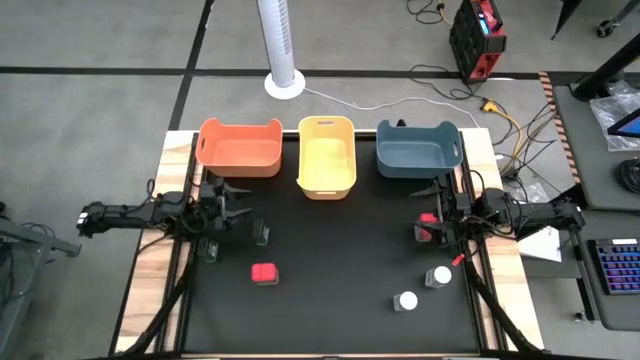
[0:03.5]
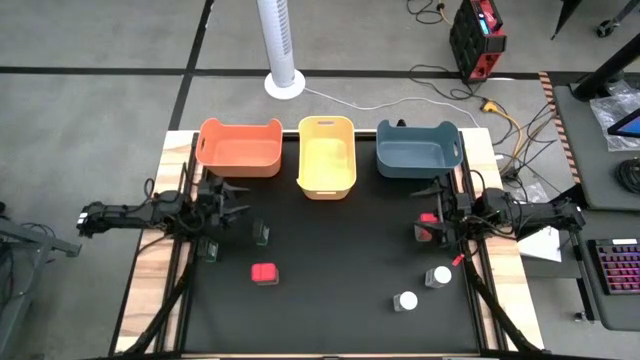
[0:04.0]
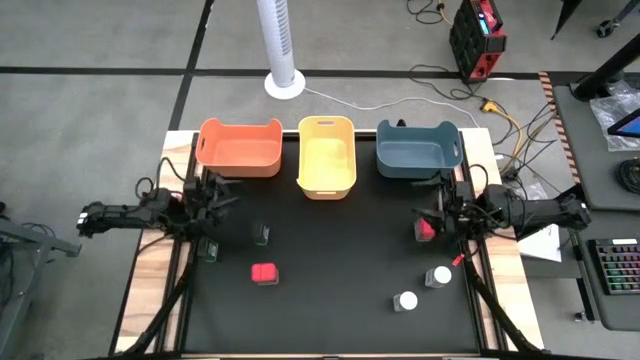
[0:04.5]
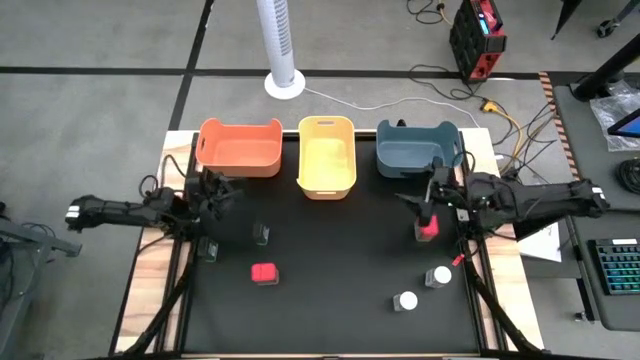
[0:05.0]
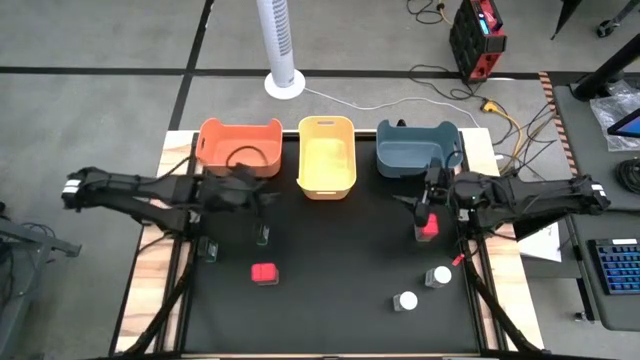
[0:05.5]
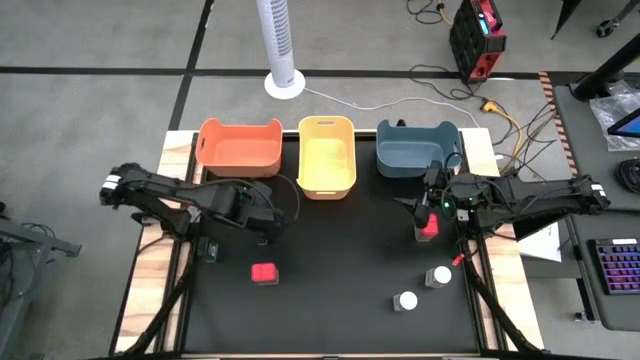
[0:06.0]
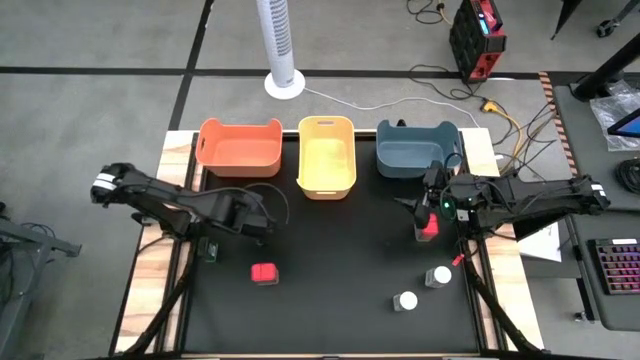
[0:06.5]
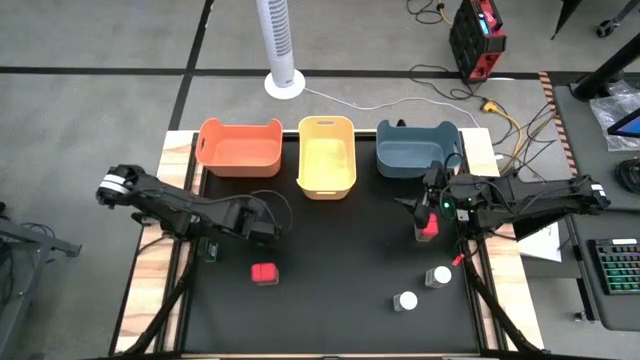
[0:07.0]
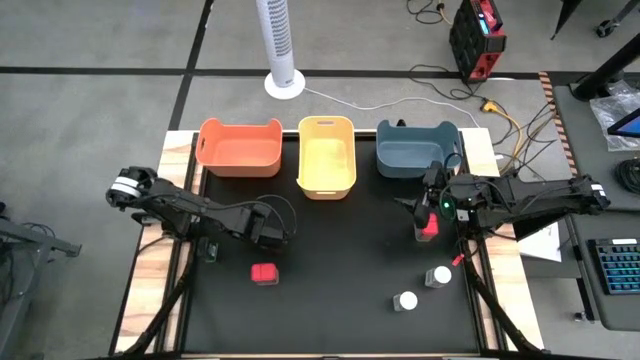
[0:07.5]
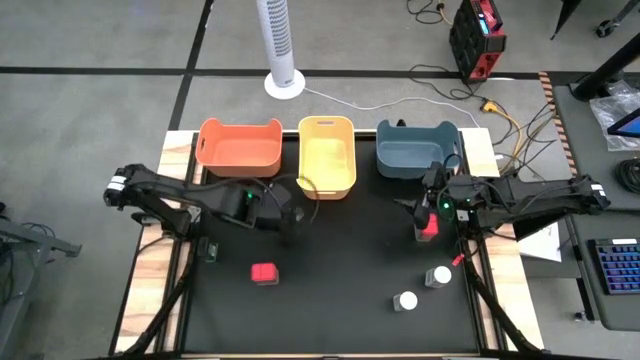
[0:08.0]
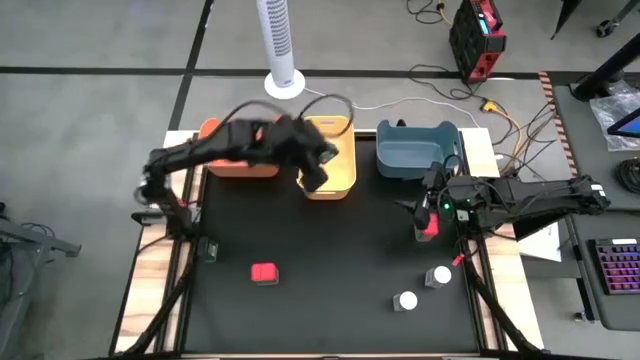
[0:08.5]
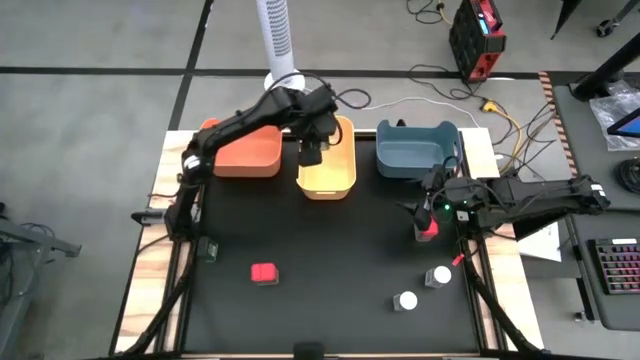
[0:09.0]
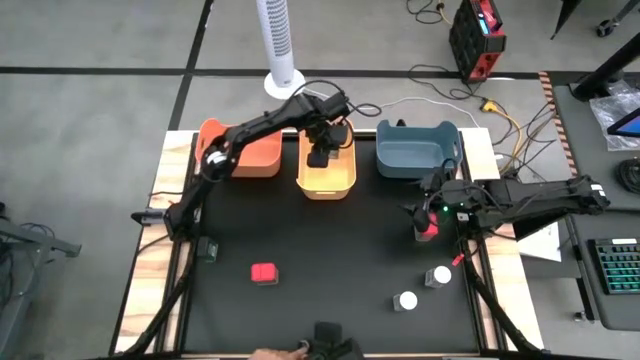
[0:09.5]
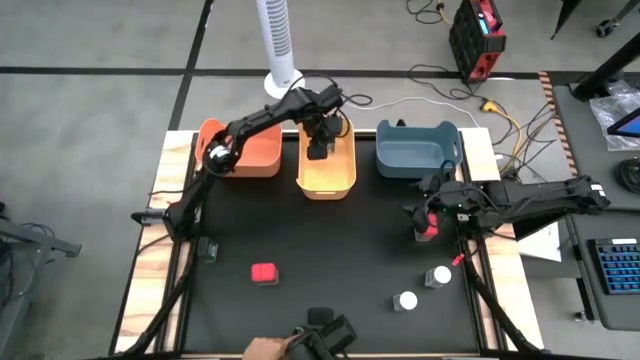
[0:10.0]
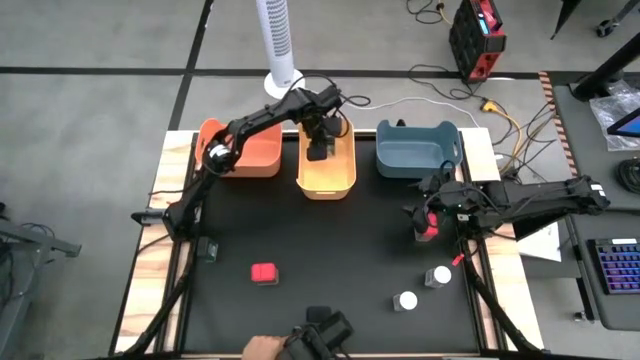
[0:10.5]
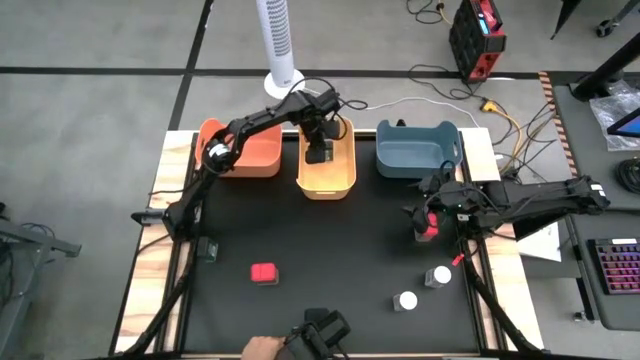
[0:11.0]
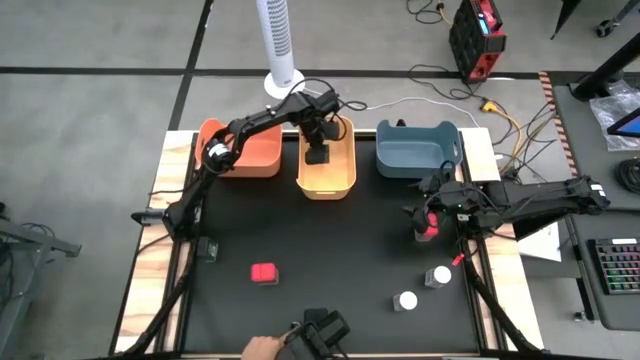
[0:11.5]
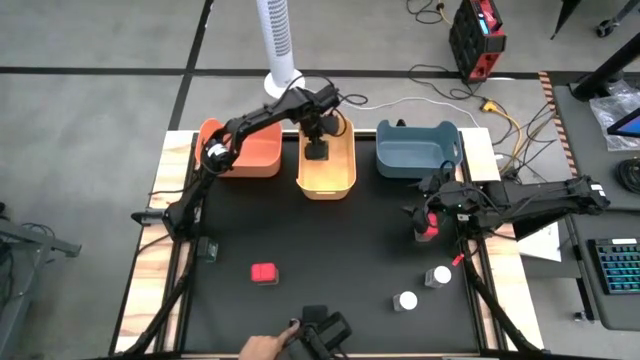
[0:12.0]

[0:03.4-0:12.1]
Task: Sort spices by type
Put the right green spice can into the yellow bin

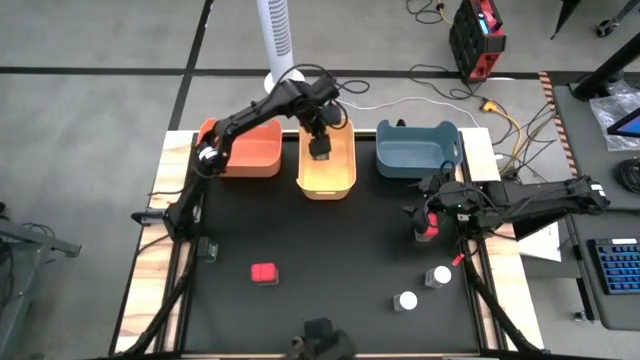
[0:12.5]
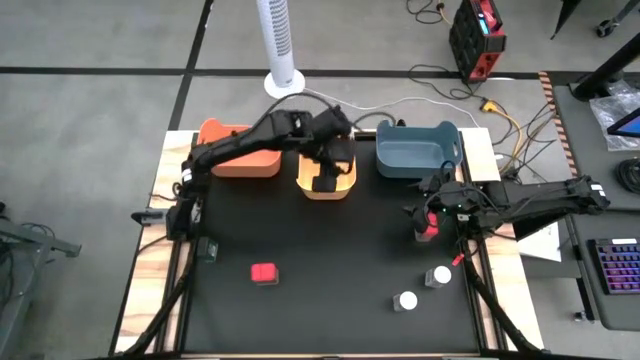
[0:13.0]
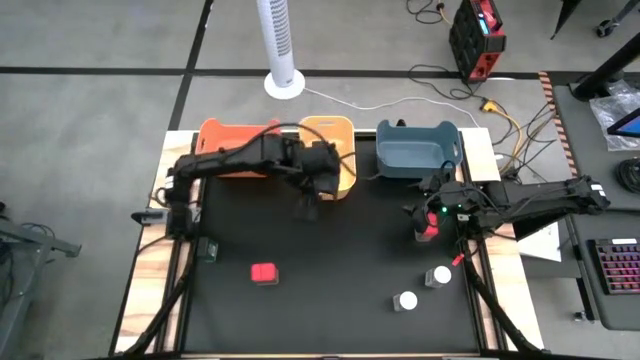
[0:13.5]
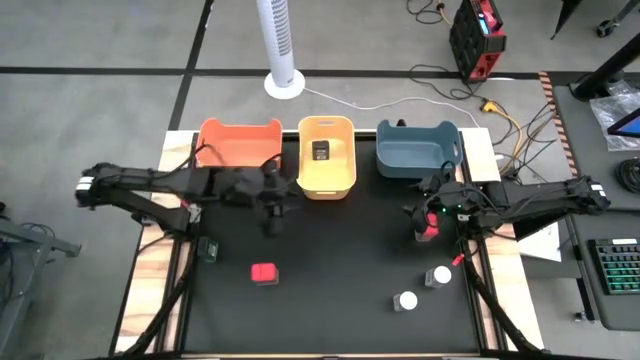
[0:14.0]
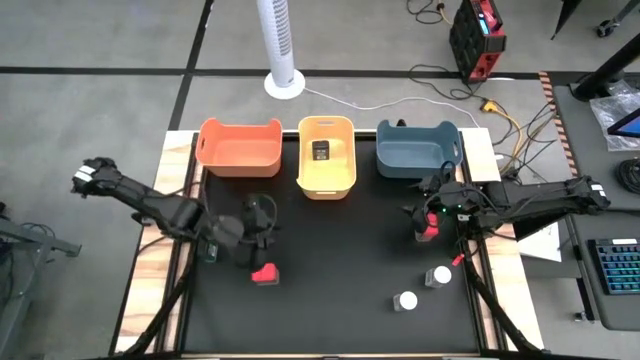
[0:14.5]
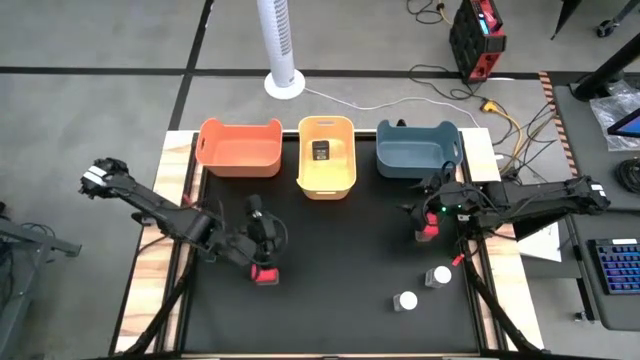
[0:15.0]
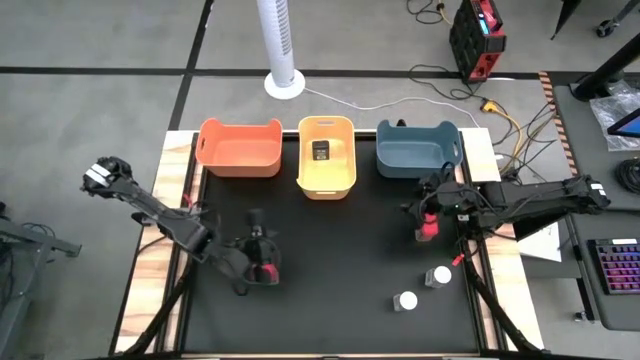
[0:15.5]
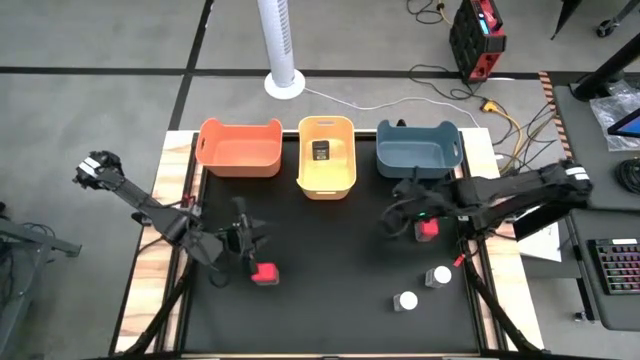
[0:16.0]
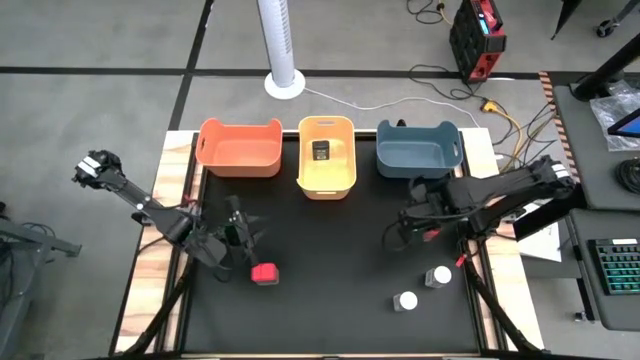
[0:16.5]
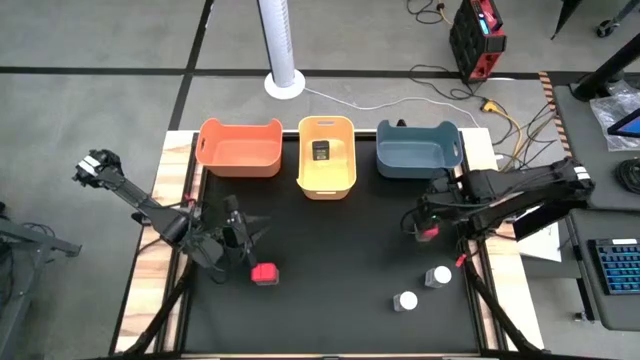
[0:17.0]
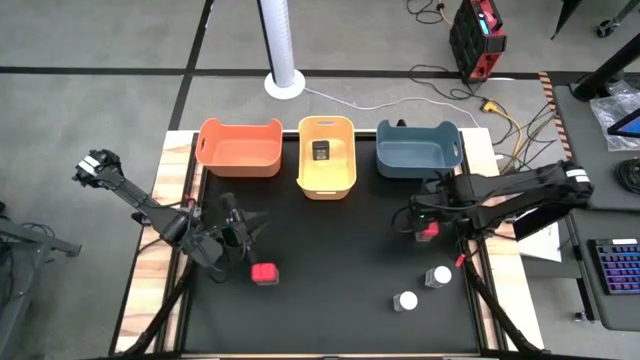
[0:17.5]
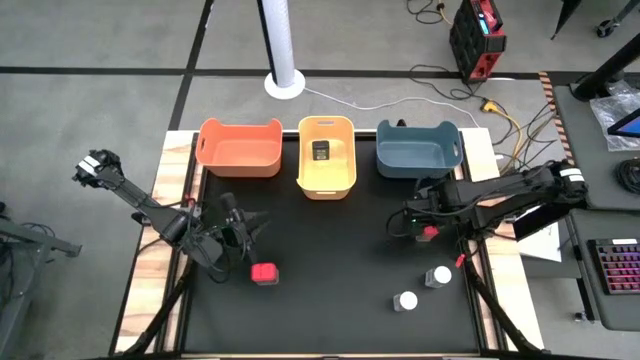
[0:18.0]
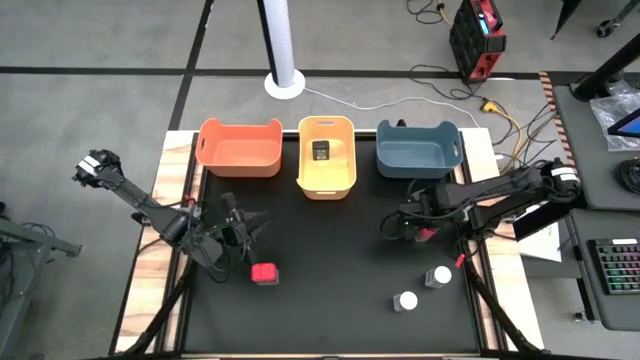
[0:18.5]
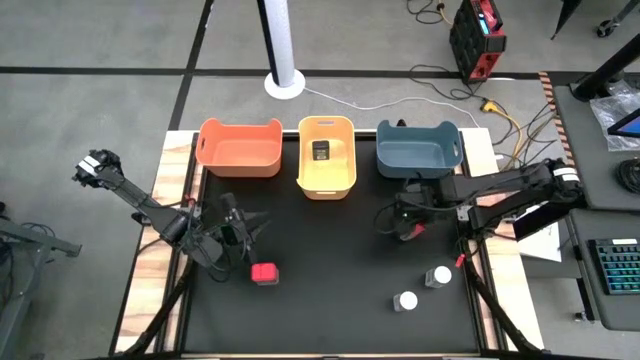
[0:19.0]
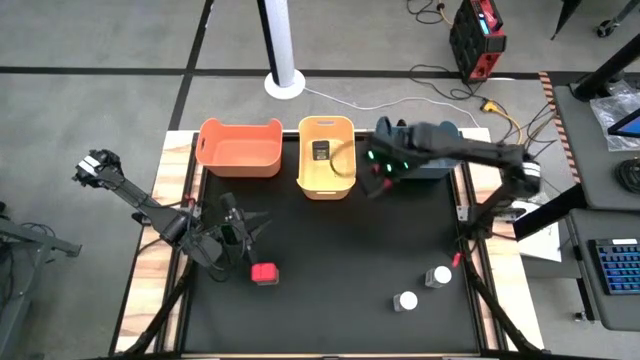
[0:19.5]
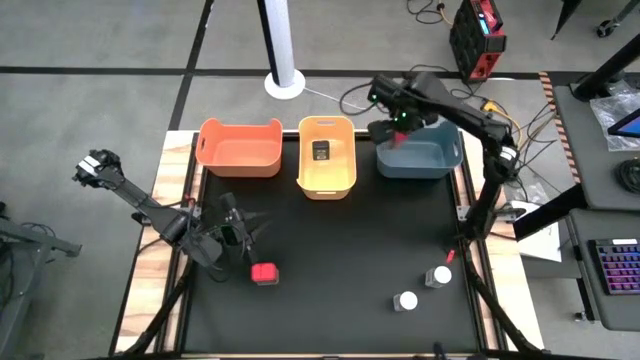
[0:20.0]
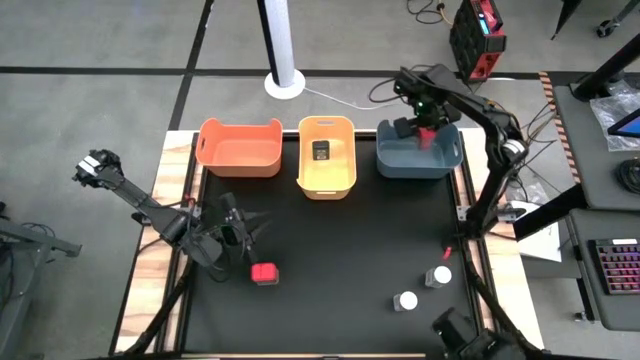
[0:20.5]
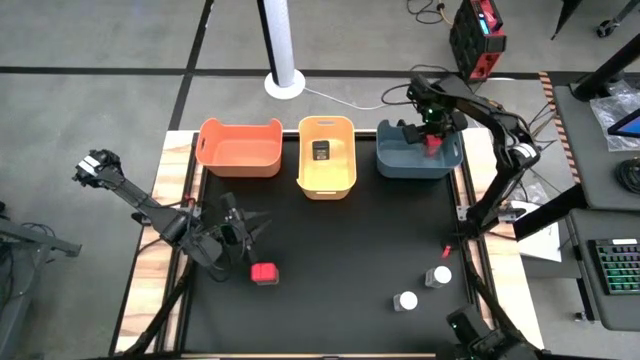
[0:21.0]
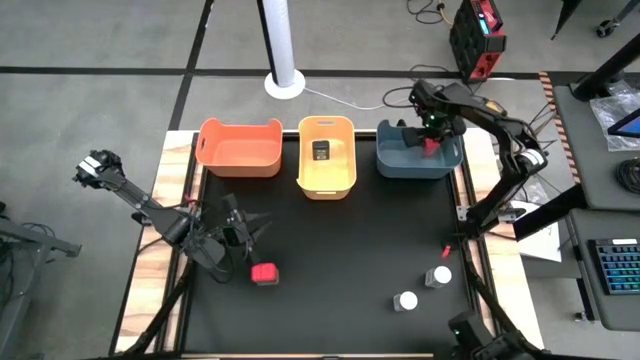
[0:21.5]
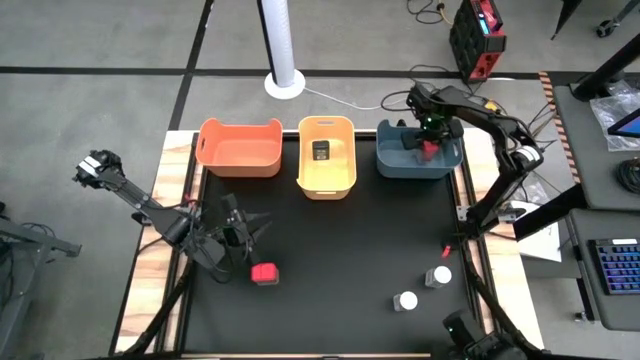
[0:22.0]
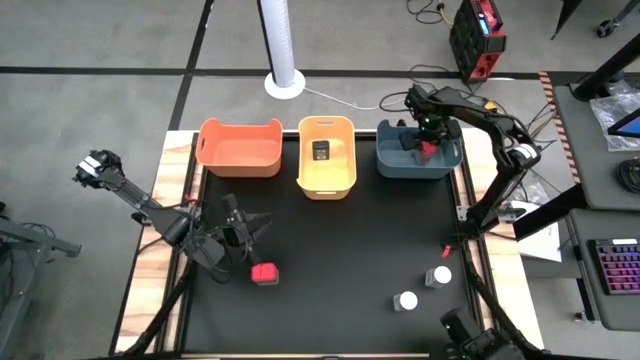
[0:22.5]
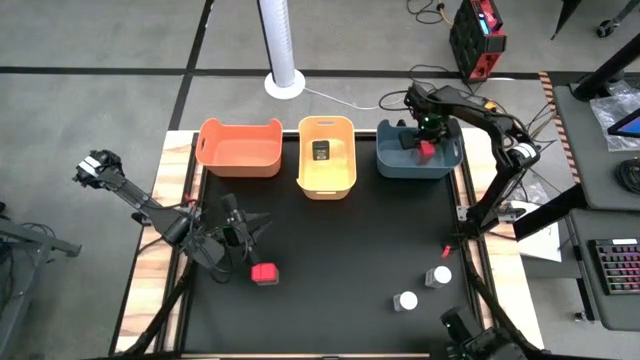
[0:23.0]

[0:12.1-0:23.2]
Put the right red spice can into the blue bin
